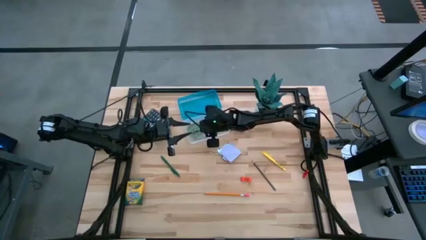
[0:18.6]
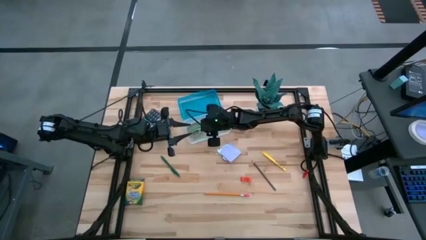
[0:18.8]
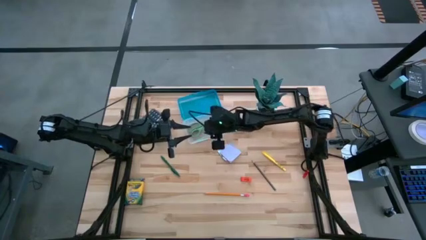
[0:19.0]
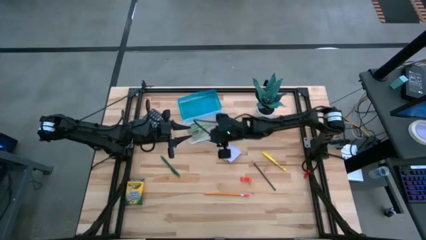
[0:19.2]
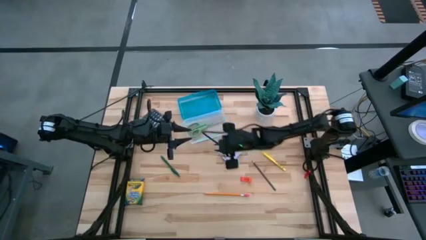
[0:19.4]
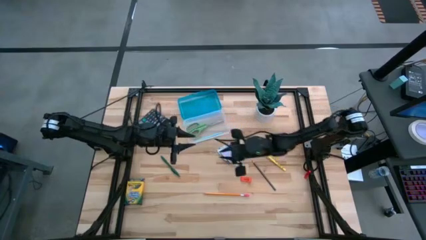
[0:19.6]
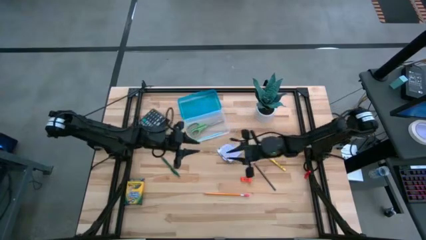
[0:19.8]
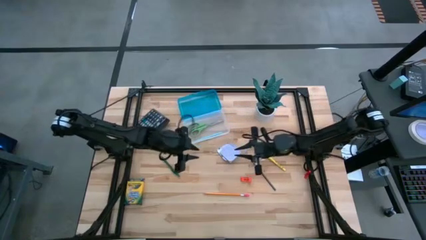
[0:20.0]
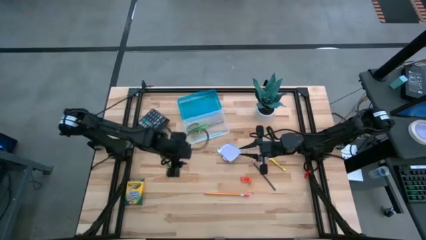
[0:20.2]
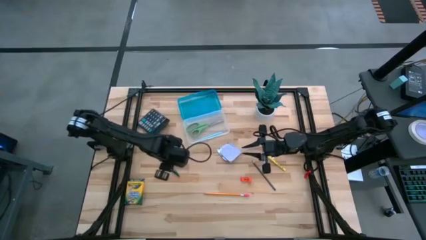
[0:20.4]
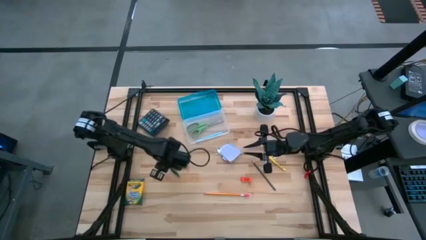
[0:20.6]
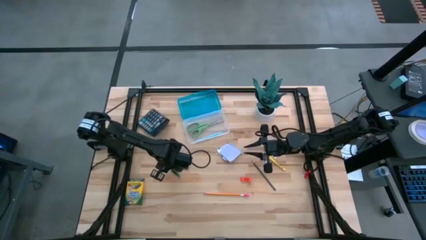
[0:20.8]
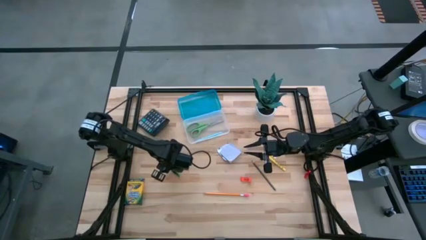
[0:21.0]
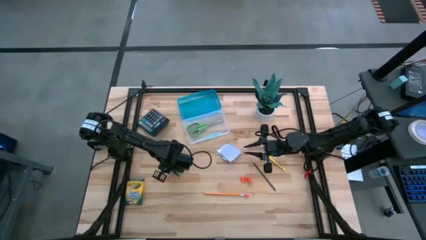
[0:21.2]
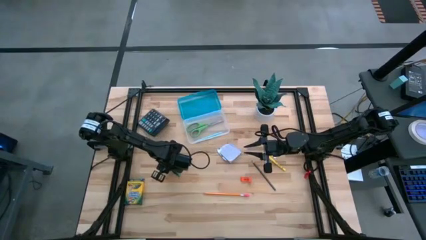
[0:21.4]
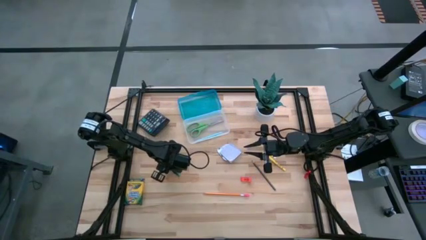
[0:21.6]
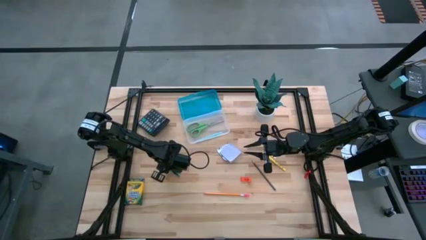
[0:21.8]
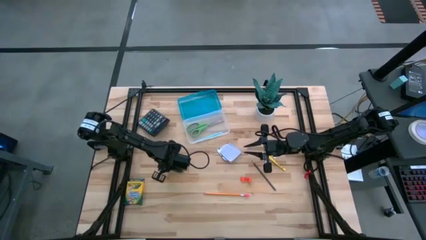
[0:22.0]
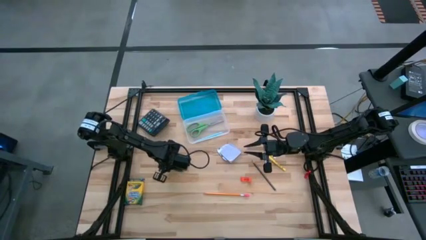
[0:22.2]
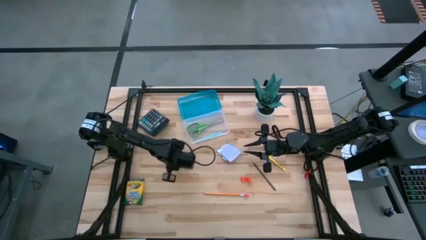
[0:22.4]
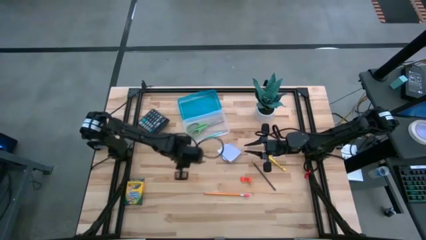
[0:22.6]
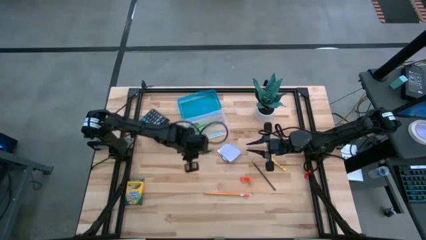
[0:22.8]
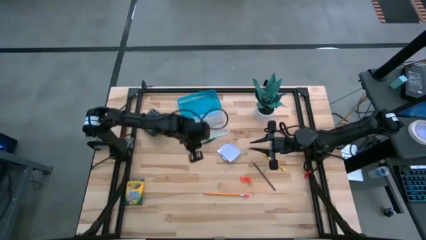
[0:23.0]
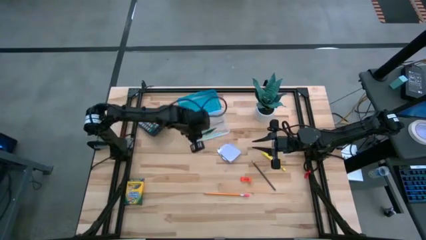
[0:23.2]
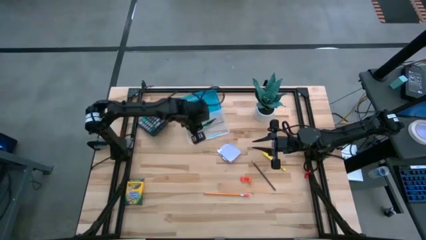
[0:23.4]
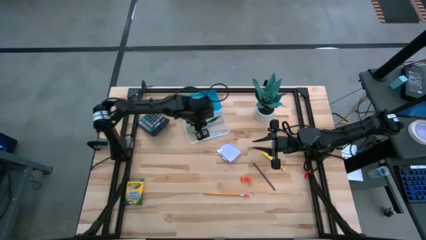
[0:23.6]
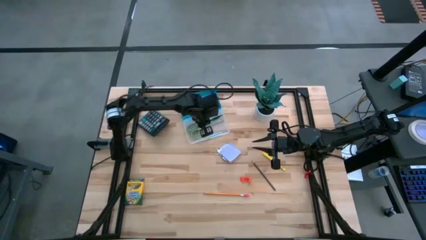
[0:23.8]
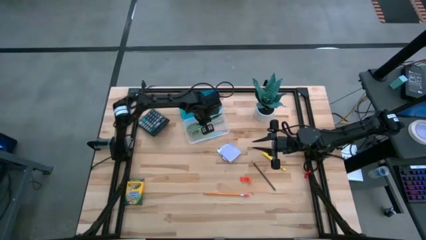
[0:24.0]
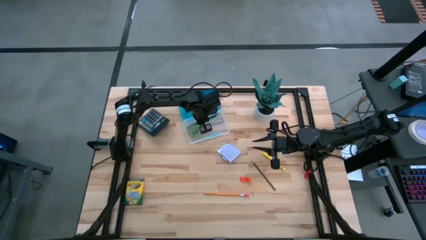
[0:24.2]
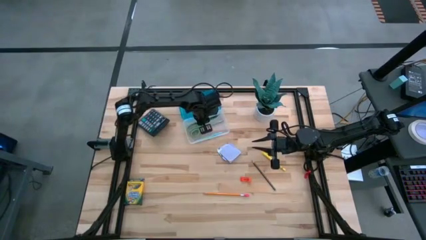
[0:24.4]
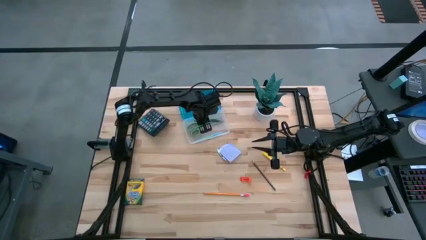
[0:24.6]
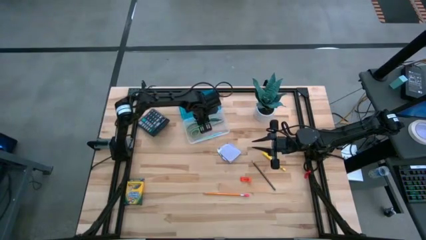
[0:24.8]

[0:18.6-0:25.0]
Task: Pack school essentials
Put the green pen into the blue supply box

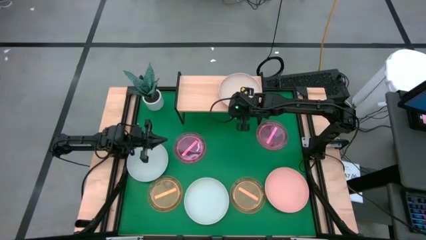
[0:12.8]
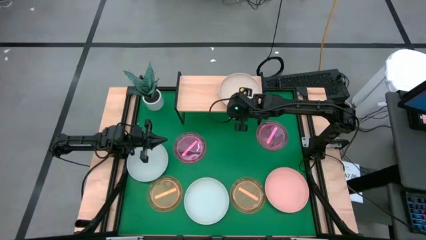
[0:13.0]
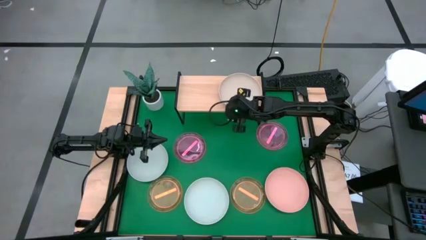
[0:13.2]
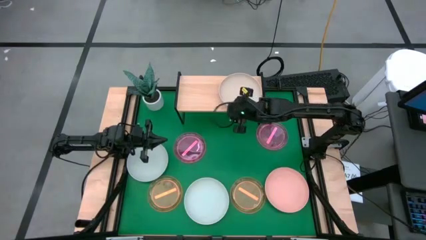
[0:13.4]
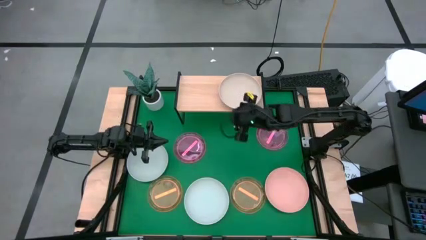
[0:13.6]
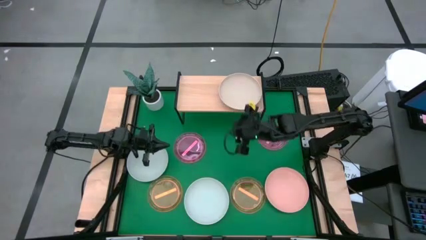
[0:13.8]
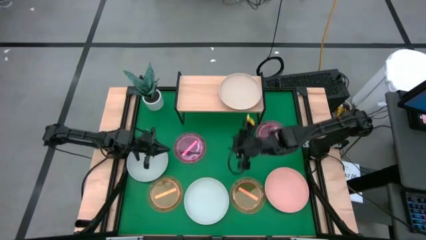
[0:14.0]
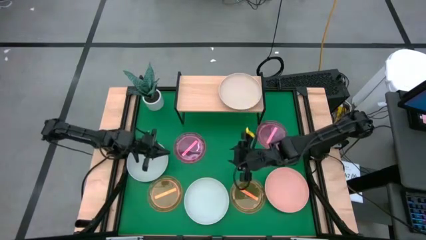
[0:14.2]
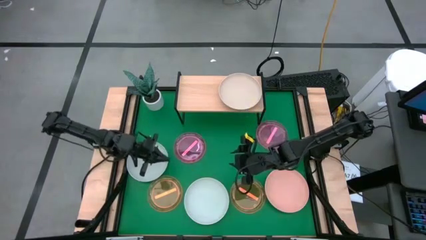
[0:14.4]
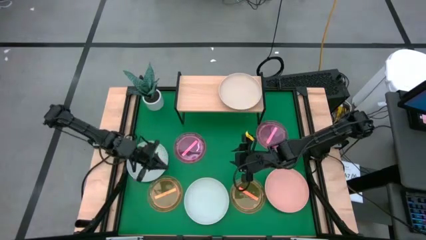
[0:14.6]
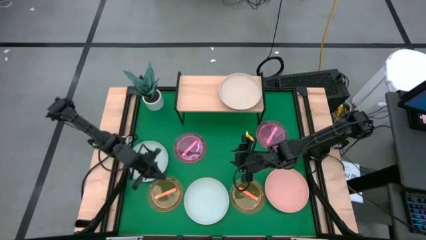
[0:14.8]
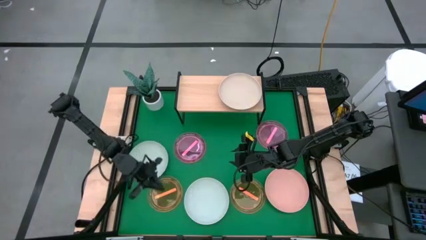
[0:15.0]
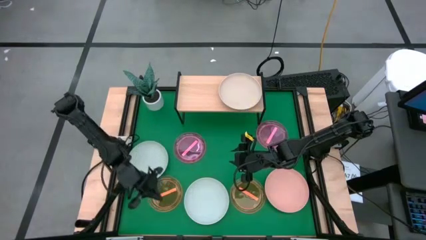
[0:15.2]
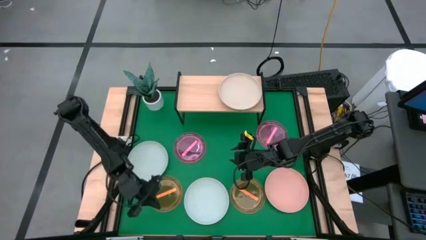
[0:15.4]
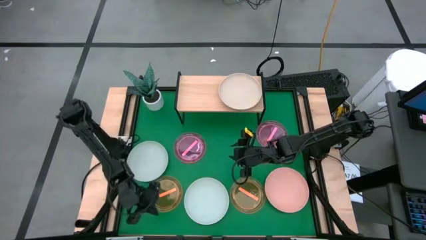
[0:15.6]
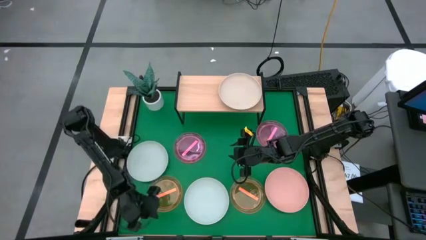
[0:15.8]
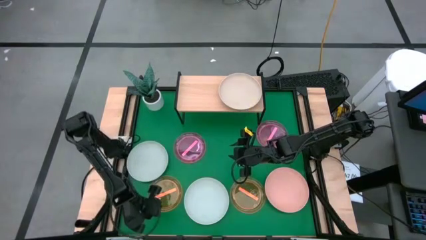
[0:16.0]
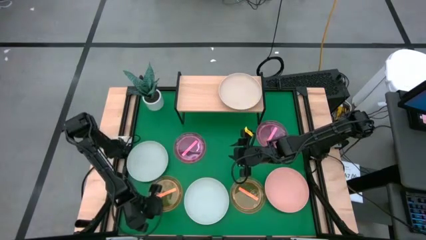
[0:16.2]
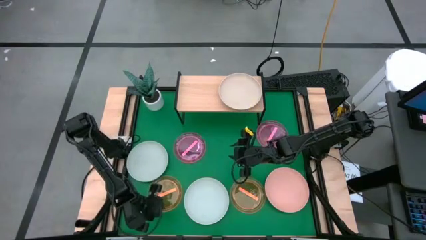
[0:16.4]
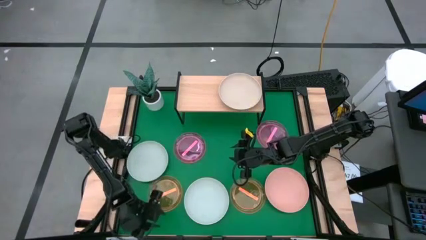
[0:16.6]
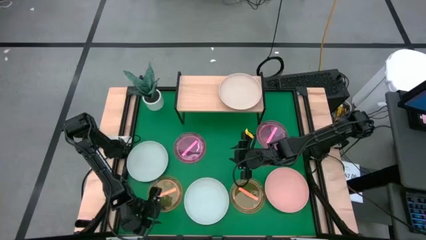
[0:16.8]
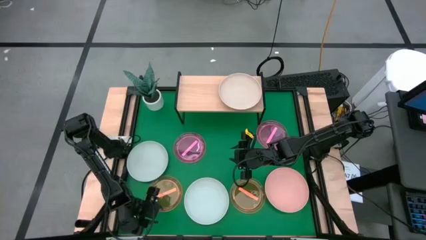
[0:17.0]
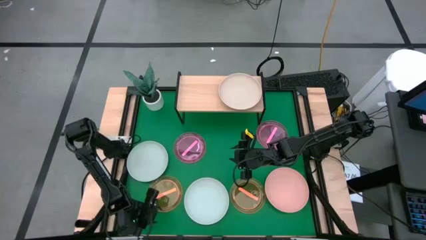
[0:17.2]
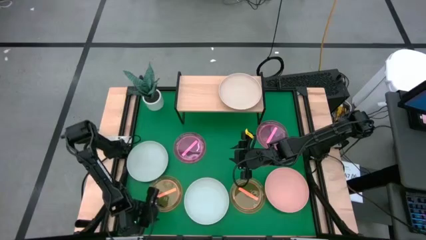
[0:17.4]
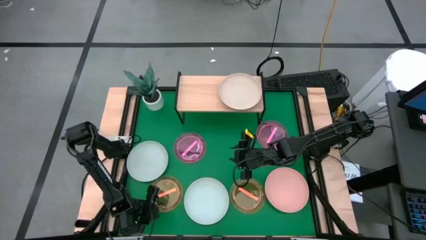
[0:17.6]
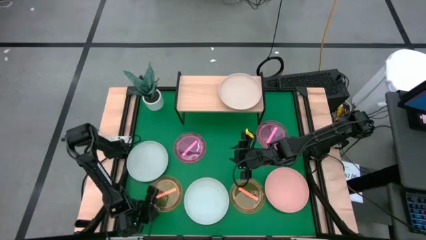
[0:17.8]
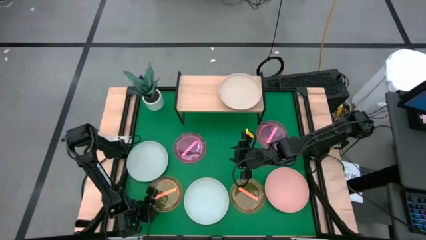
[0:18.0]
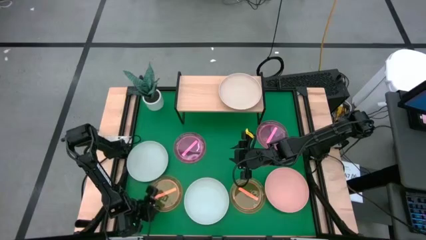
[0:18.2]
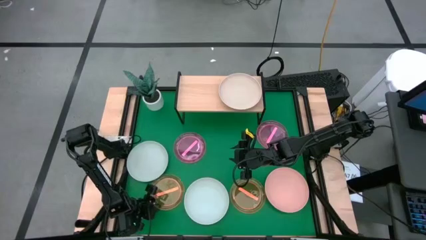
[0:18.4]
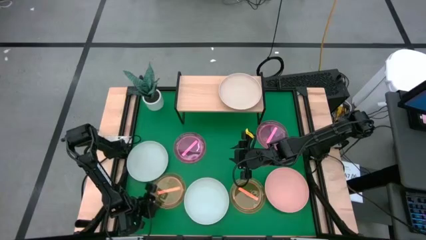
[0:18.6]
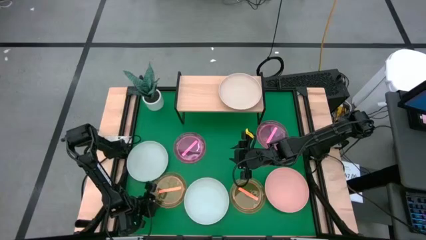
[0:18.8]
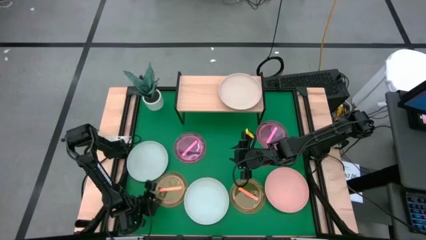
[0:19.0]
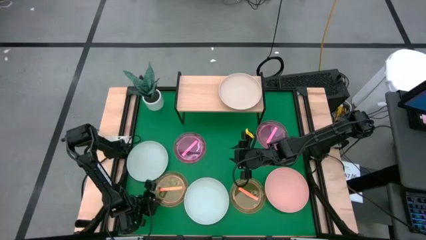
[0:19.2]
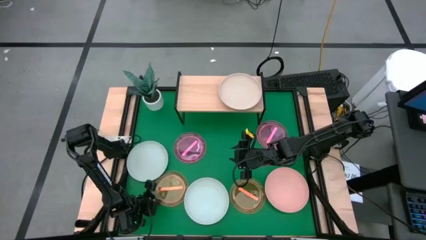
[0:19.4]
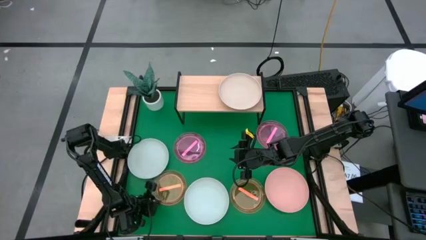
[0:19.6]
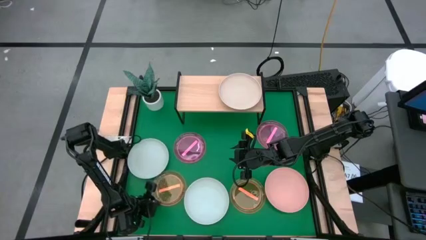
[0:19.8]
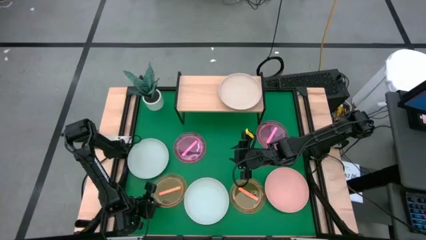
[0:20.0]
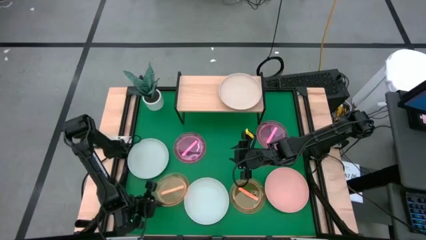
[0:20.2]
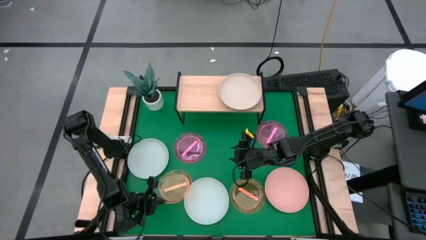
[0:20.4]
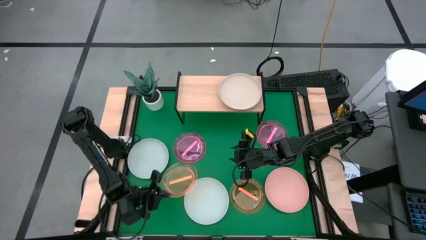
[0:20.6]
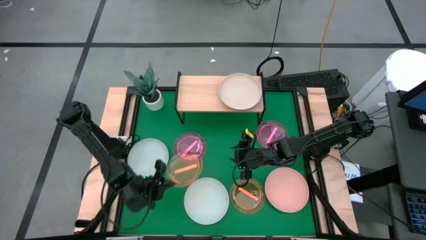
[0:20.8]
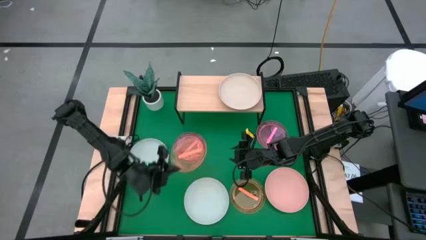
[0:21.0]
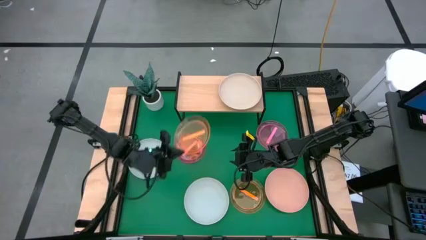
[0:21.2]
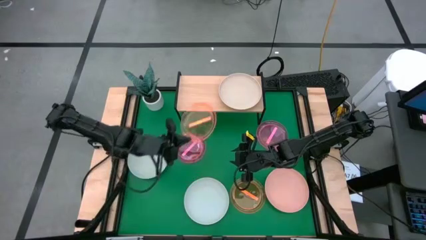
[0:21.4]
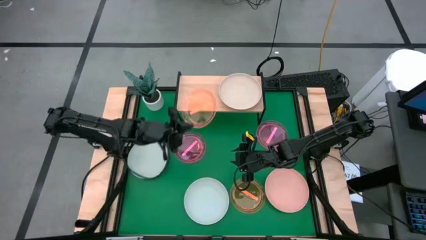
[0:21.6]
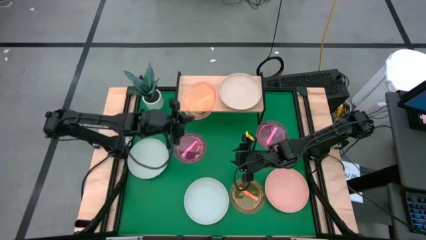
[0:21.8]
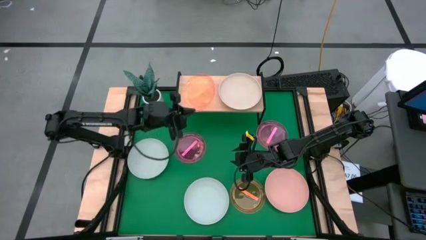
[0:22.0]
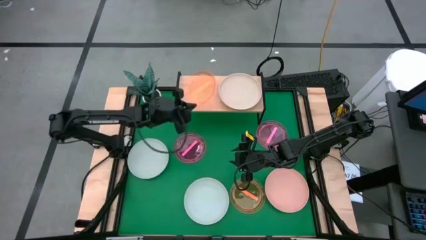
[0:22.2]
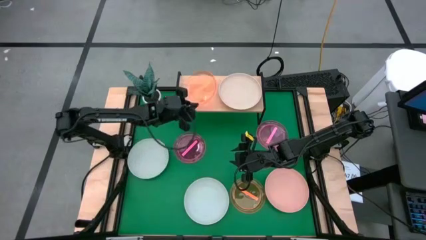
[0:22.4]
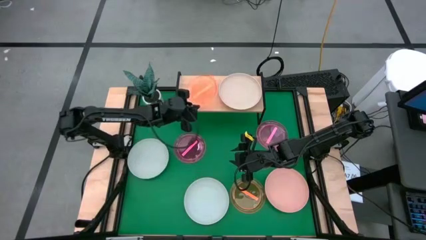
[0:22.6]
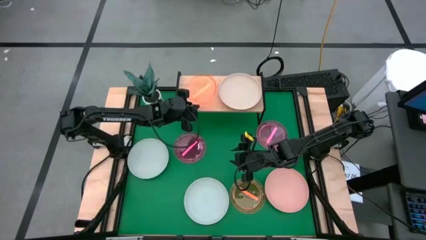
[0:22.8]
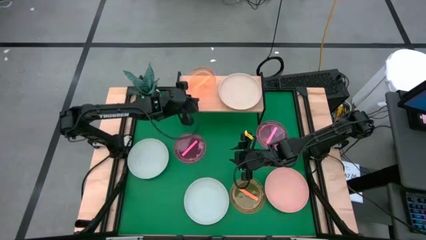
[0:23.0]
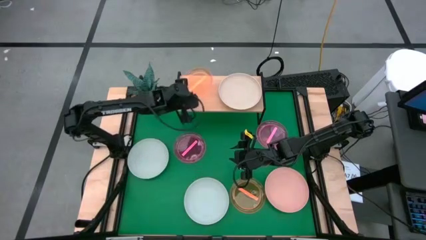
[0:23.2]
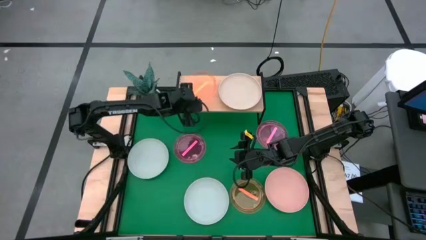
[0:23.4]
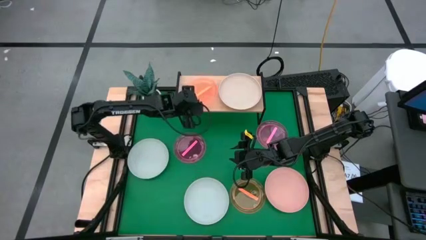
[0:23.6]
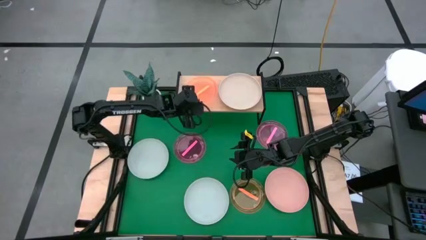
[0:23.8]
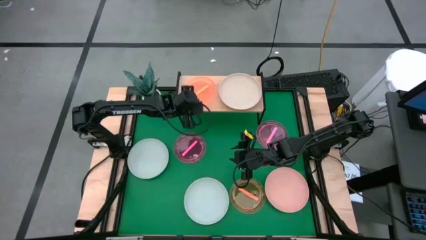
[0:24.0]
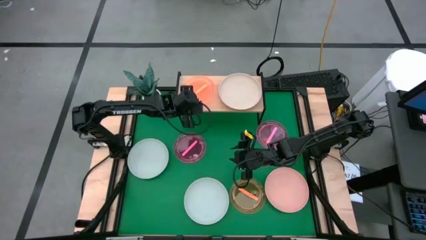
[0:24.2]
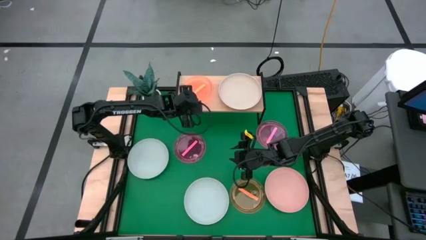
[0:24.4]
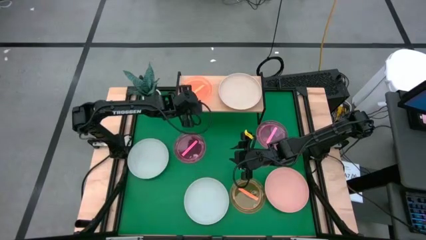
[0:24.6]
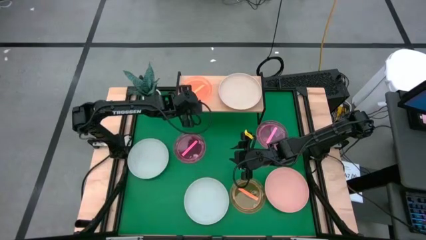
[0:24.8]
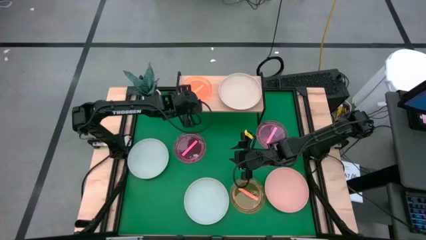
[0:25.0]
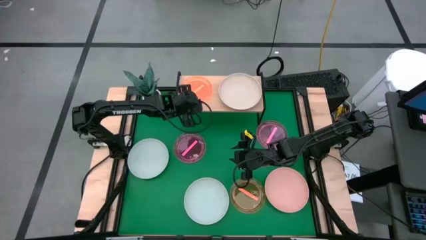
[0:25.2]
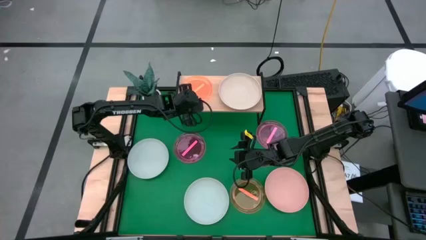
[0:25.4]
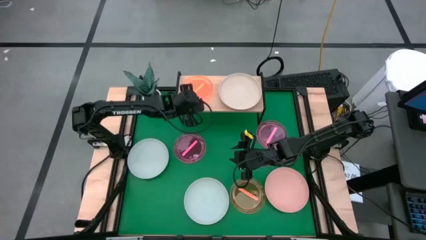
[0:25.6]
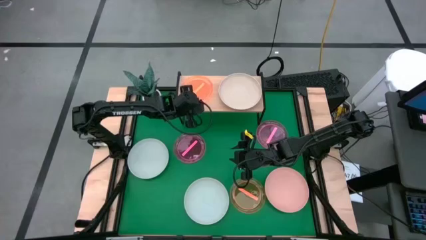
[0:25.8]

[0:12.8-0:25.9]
Task: Place and stack plates onto a shelf
Put the left transparent orange plate on the shelf
